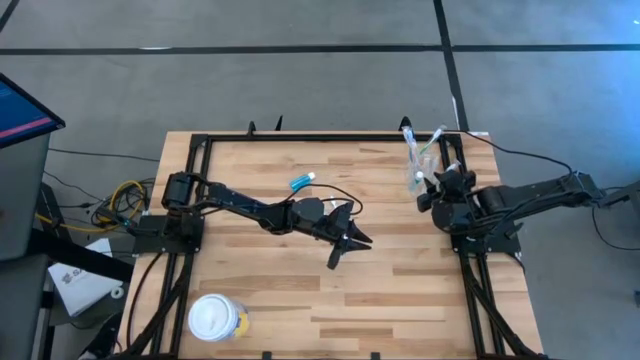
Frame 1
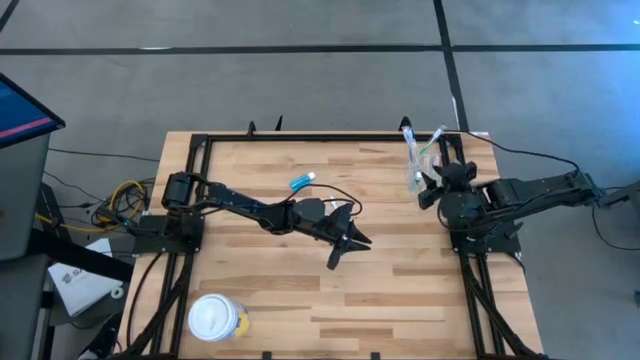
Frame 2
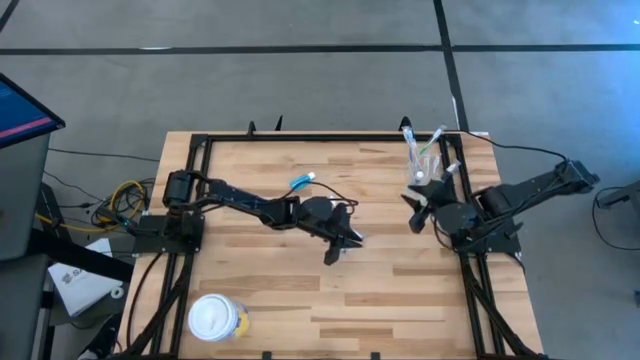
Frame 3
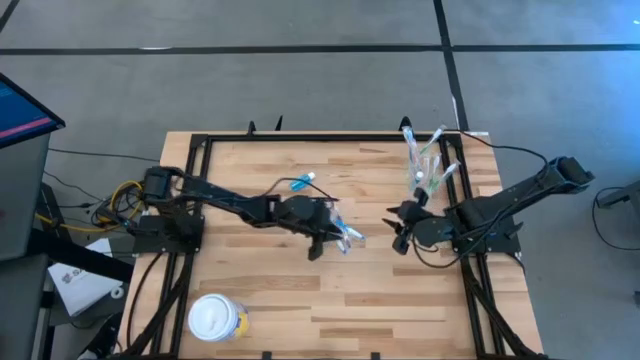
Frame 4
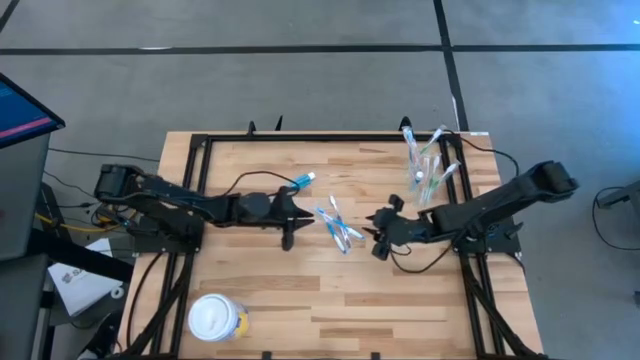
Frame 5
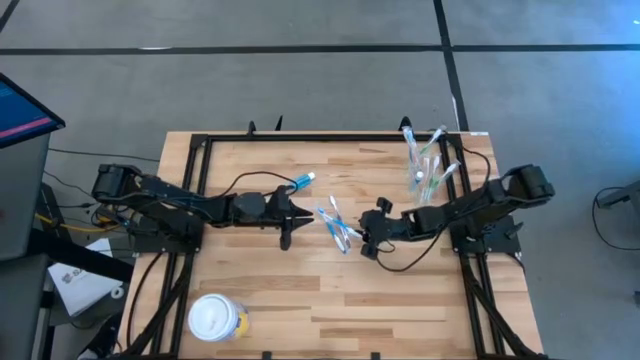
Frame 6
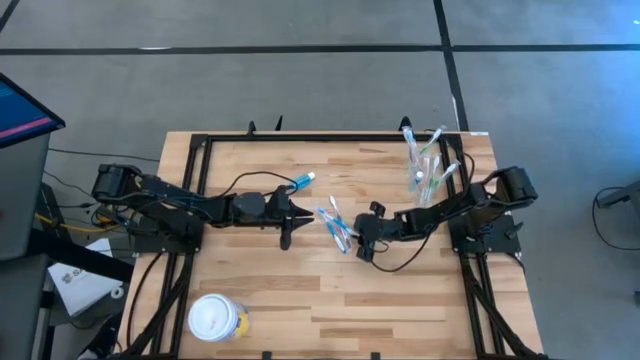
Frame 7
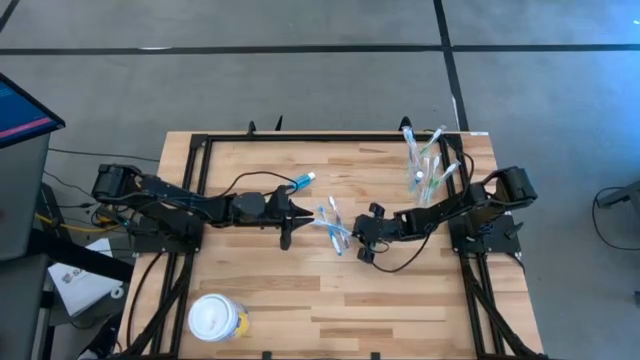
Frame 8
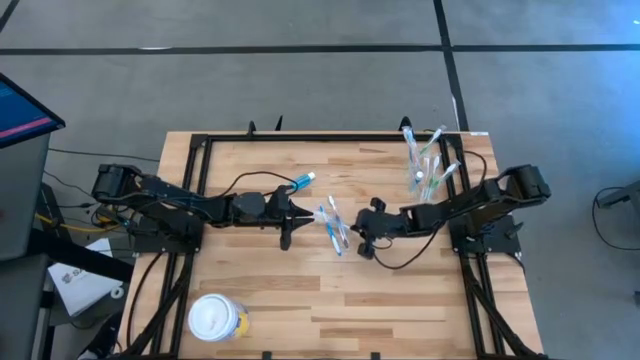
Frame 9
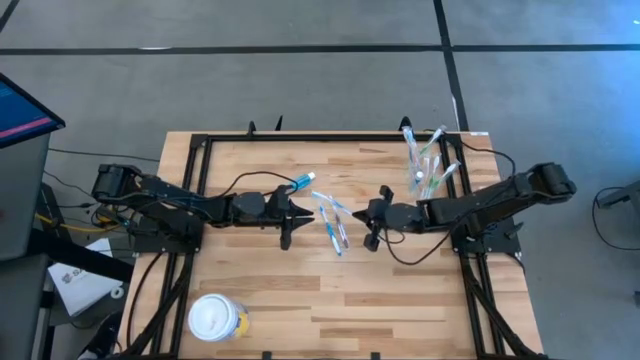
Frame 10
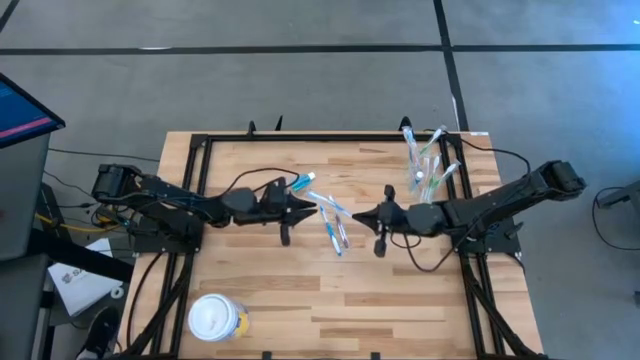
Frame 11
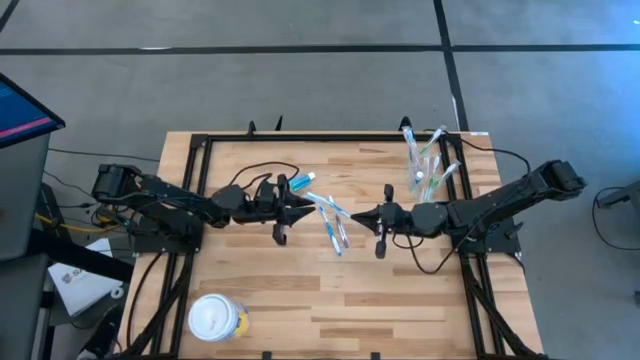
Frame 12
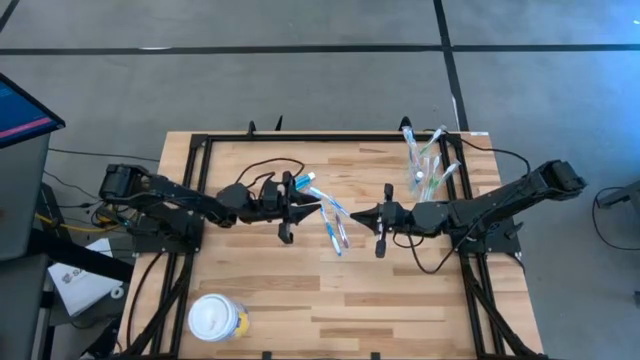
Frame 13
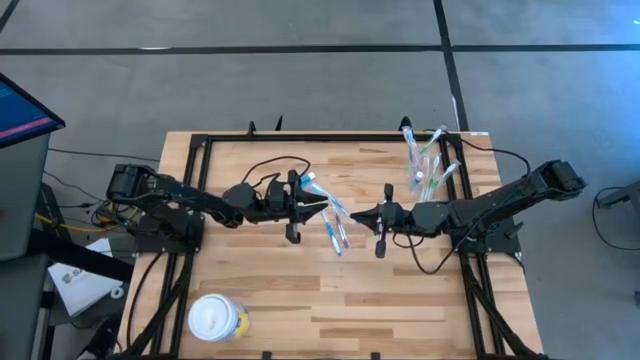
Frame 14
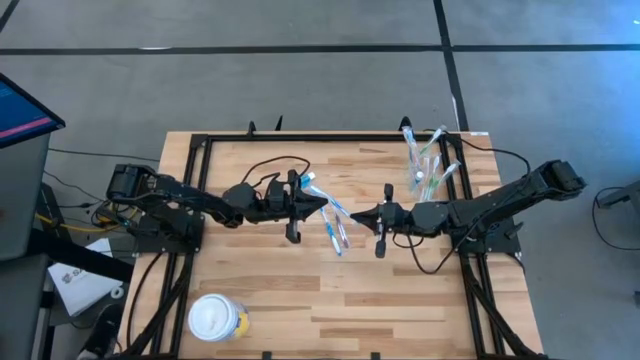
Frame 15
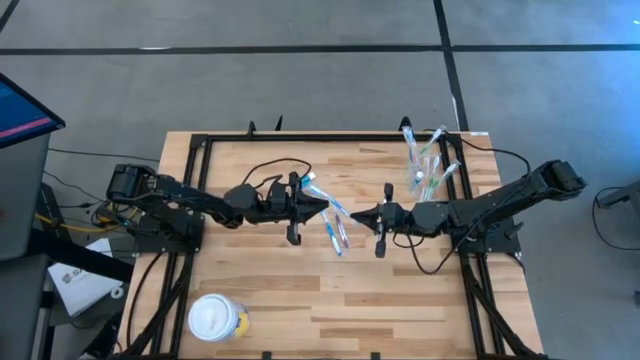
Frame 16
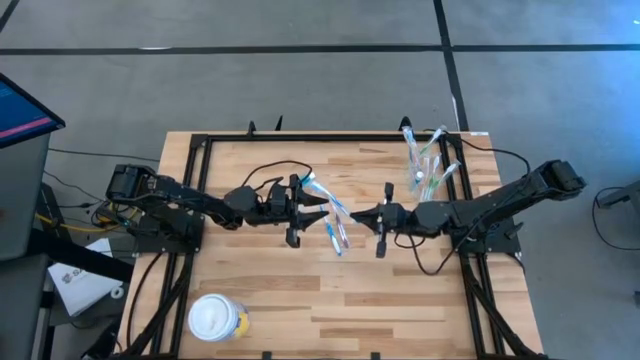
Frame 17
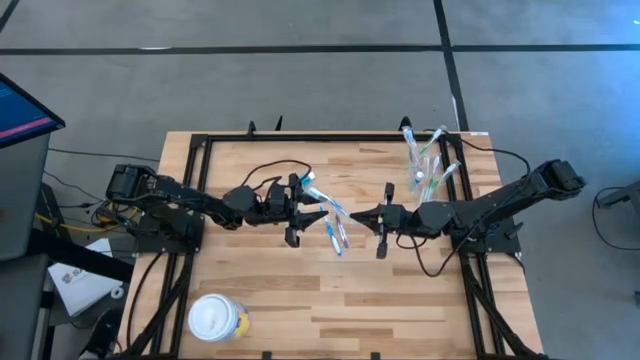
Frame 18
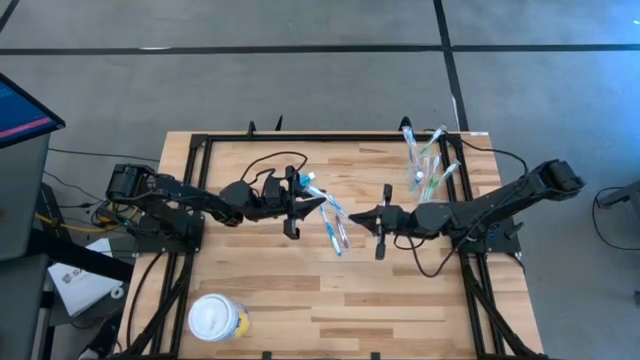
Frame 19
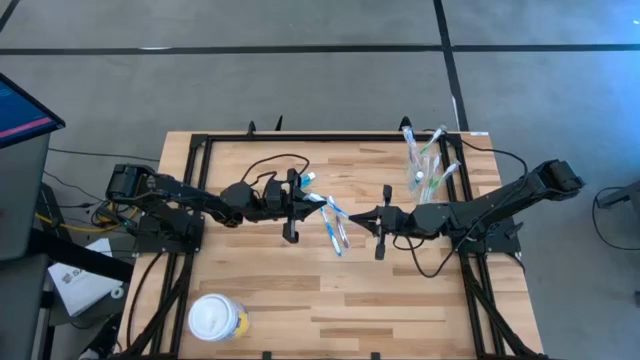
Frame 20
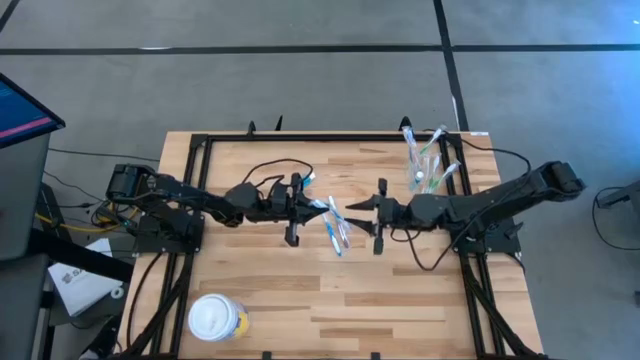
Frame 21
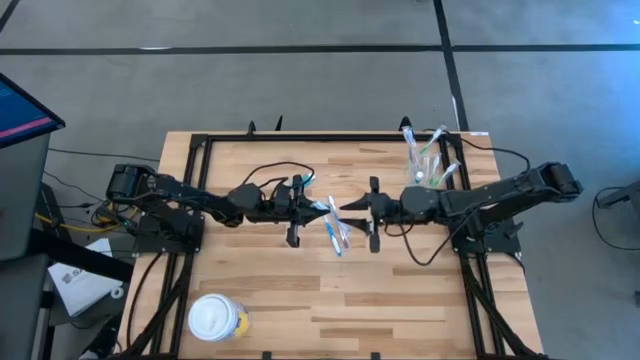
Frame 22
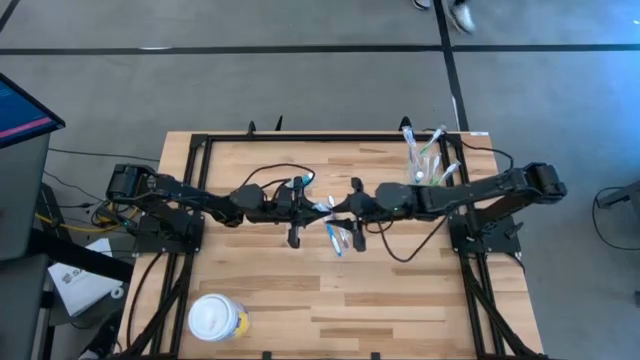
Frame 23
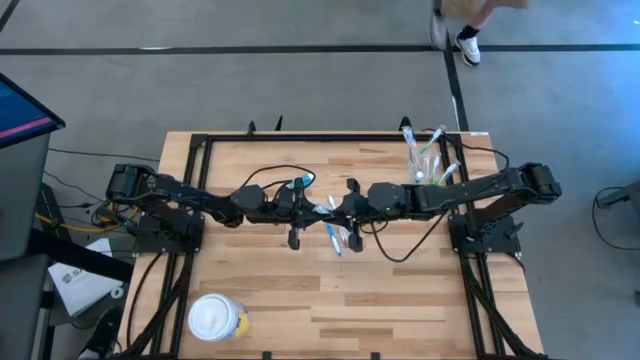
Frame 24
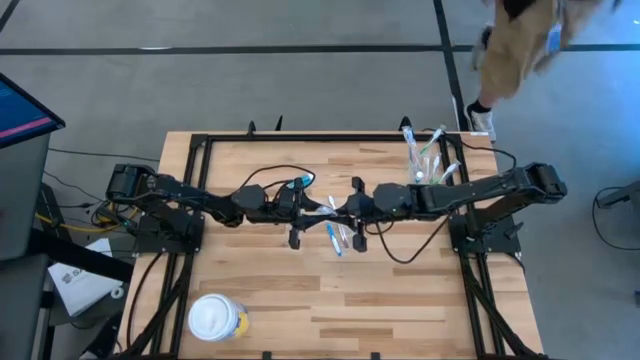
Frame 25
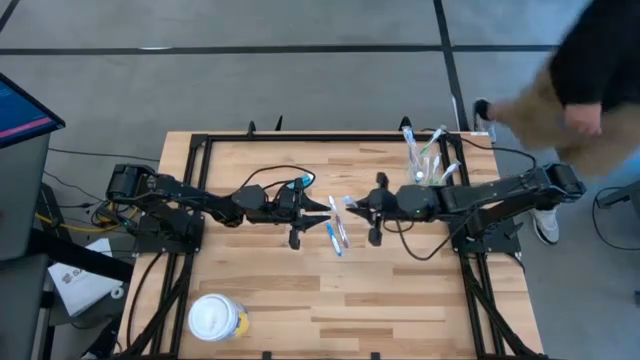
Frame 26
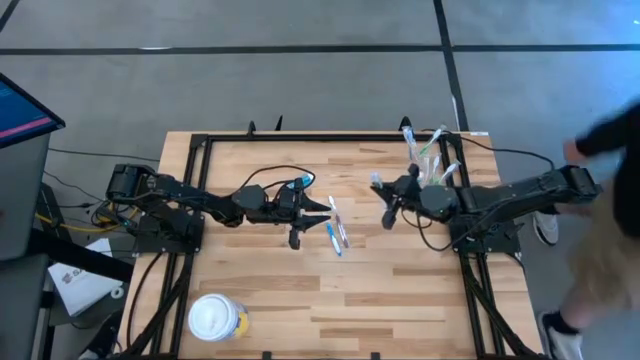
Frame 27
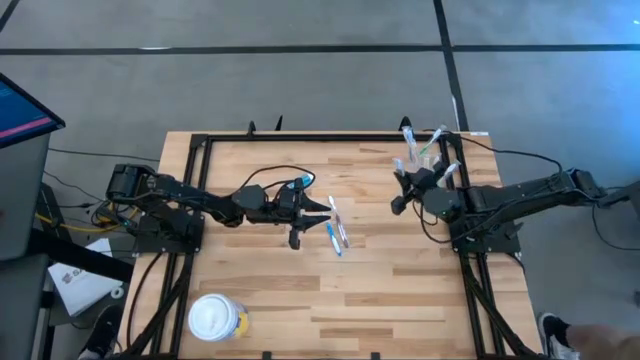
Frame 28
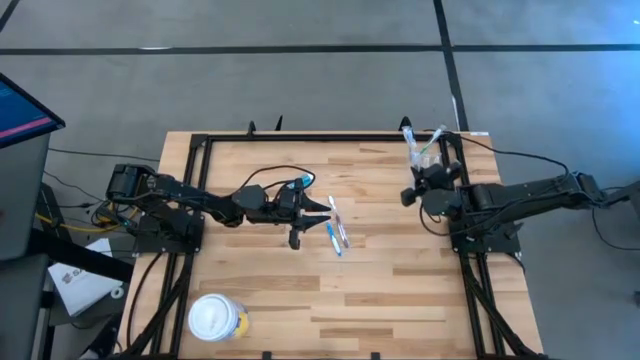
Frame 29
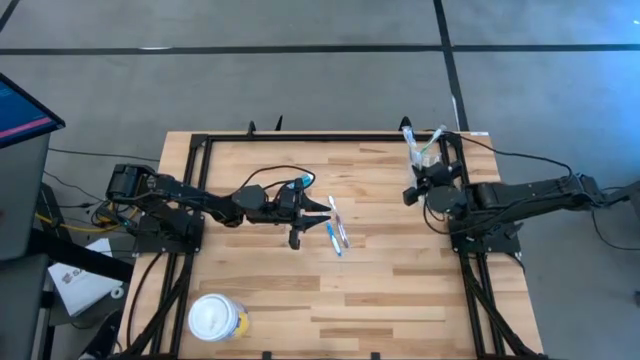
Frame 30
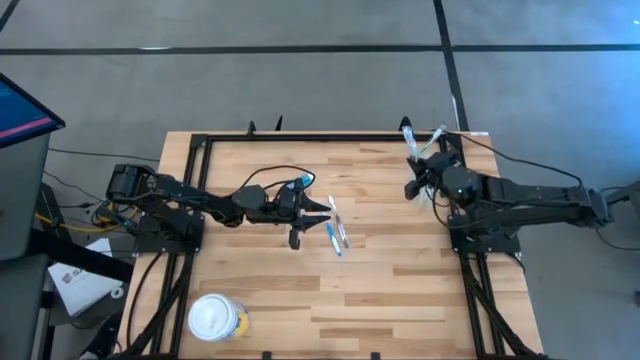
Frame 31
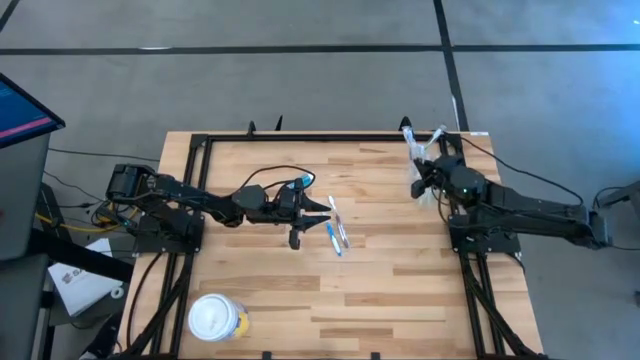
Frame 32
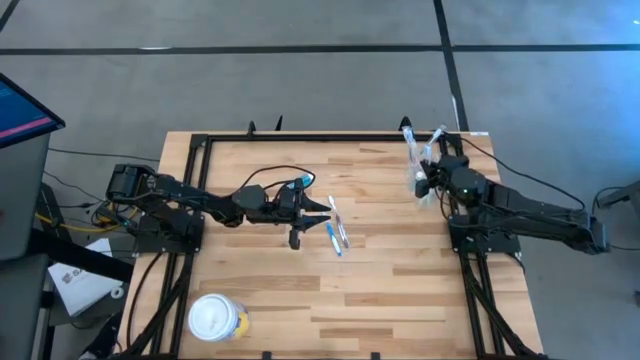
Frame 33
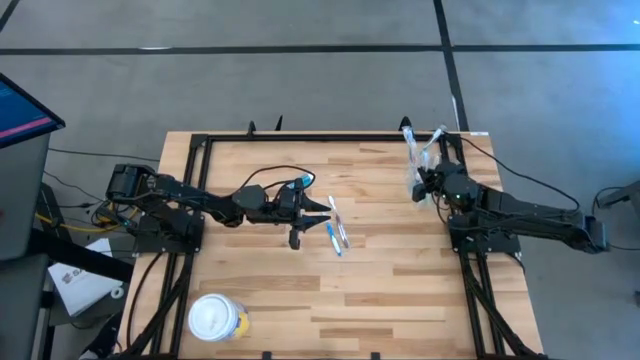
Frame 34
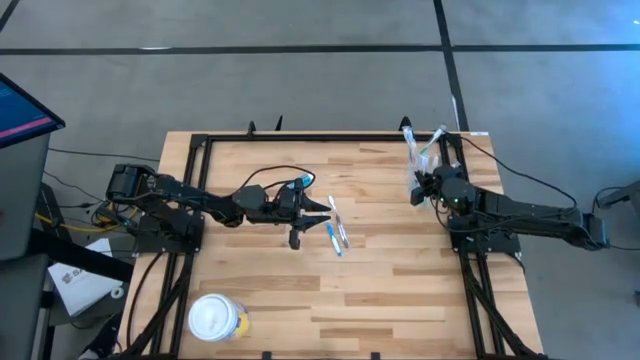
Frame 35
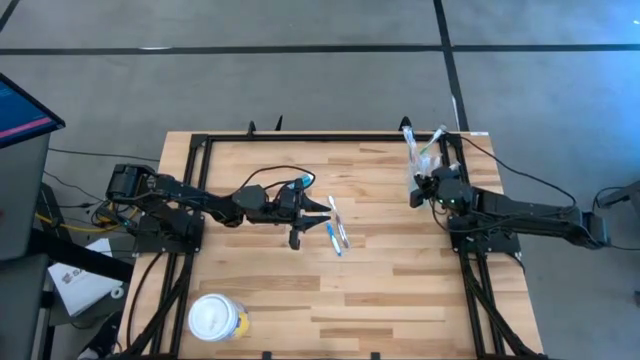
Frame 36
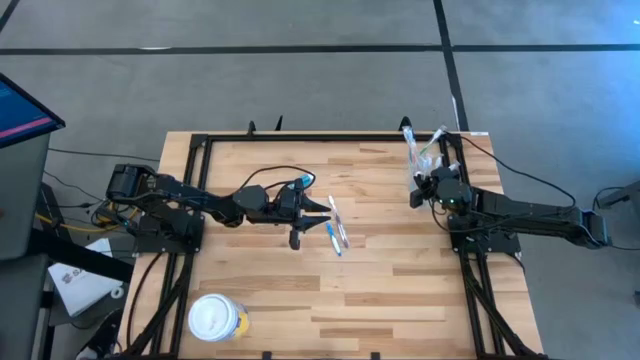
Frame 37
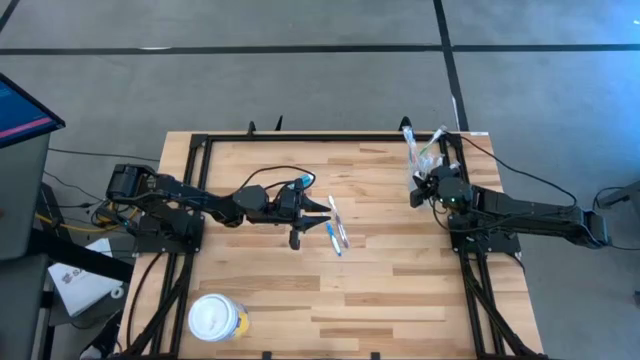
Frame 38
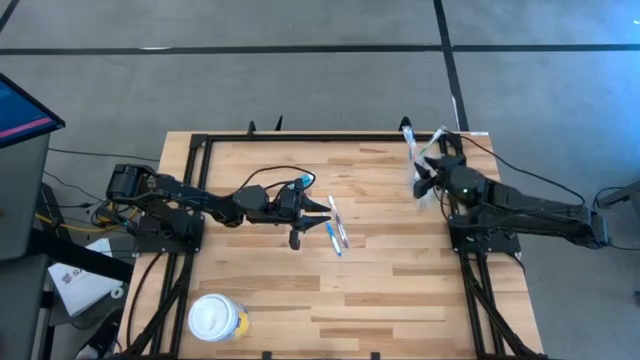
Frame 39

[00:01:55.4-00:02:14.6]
Task: Pick & Place toothbrushing station
Put the blue toothbrush into the transparent organizer

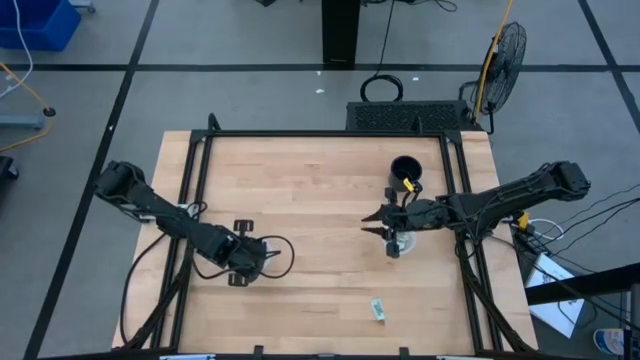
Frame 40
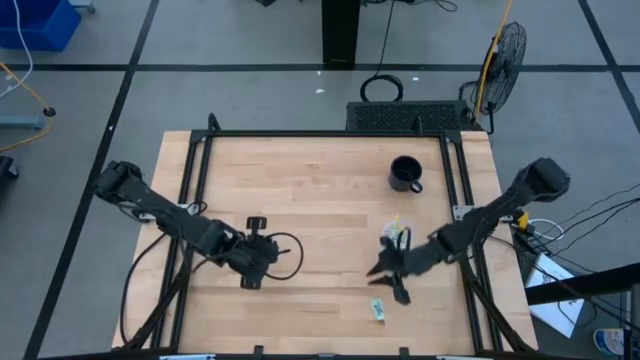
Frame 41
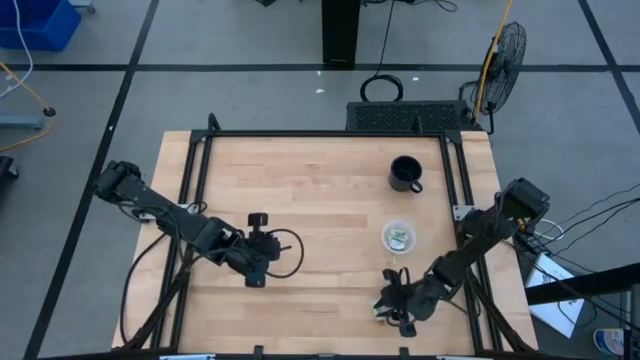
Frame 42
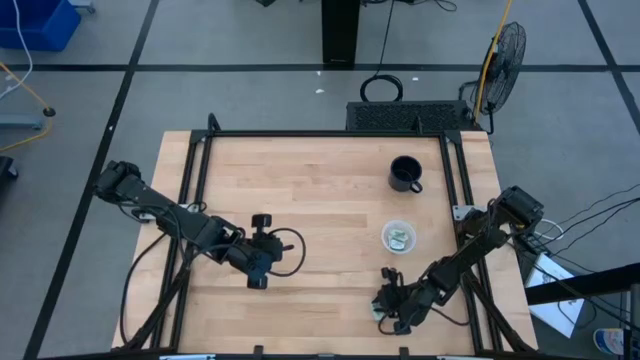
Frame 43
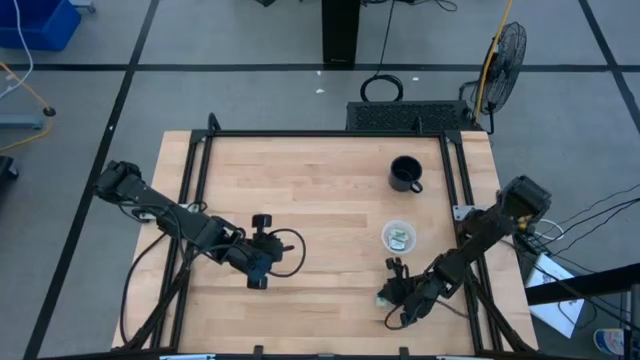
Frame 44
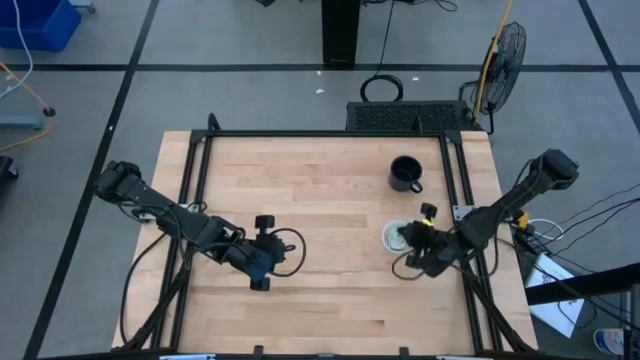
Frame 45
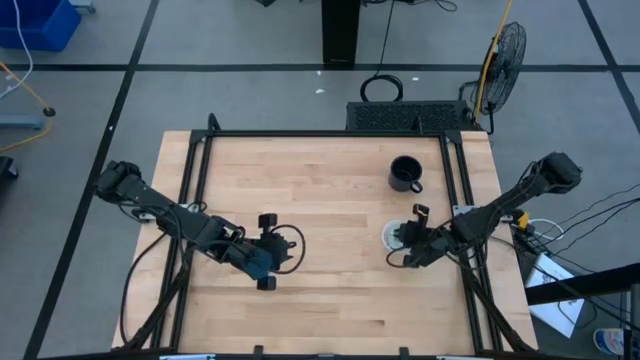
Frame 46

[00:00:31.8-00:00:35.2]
Task: Pick and place items into bin
Put the white stevia packet into the right transparent bin
